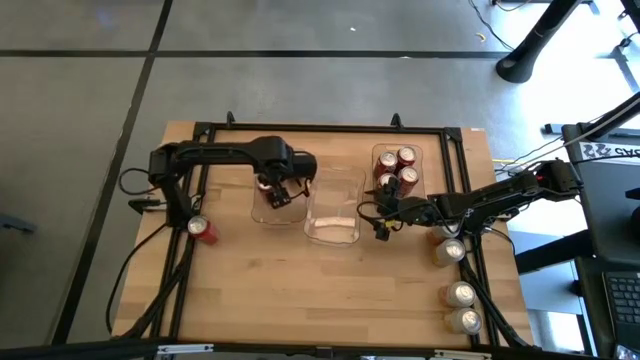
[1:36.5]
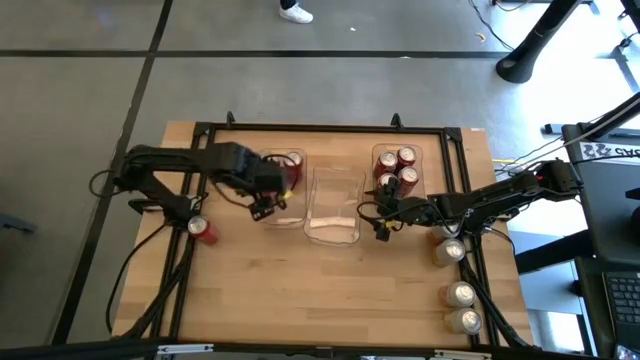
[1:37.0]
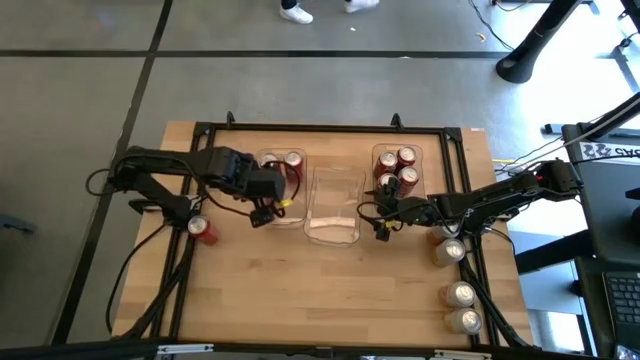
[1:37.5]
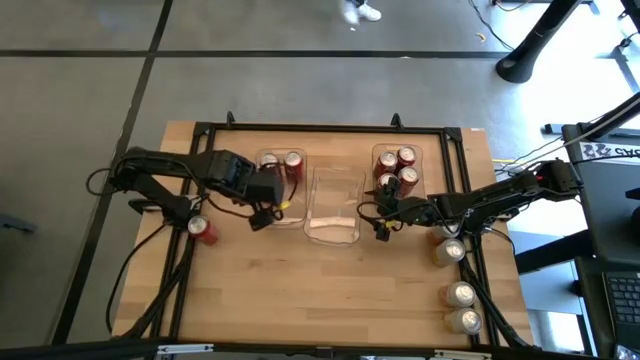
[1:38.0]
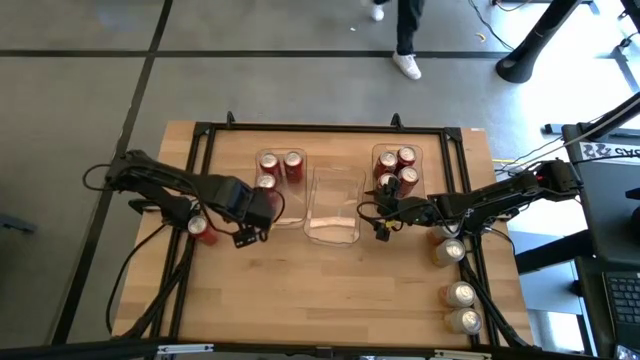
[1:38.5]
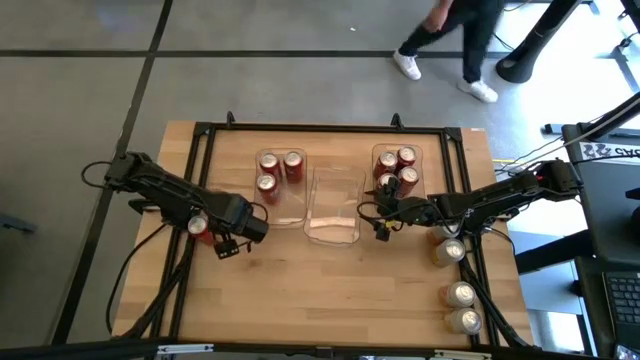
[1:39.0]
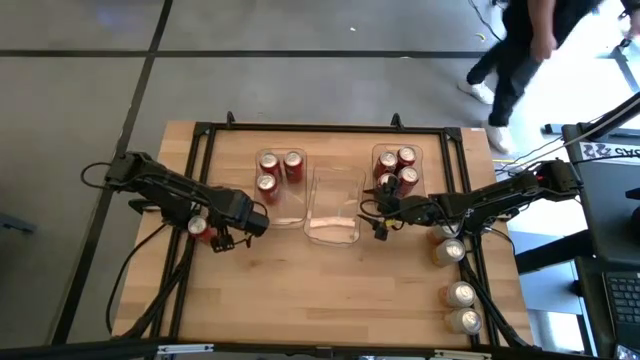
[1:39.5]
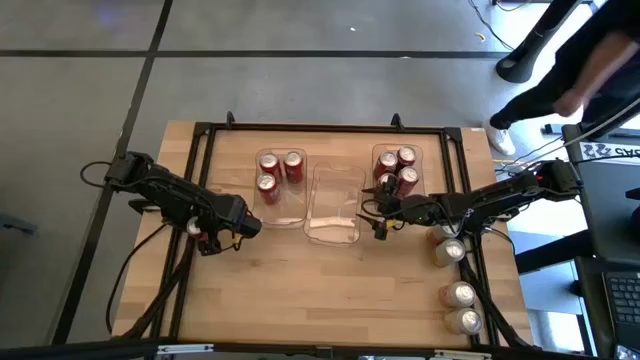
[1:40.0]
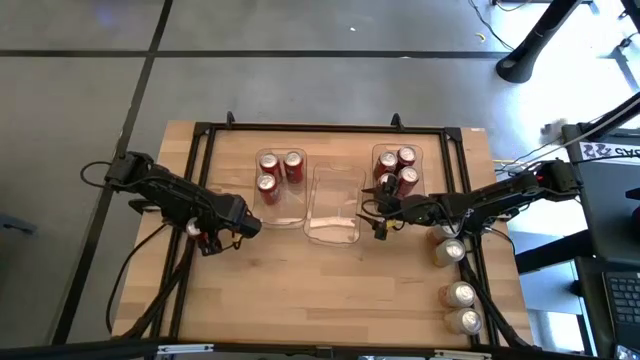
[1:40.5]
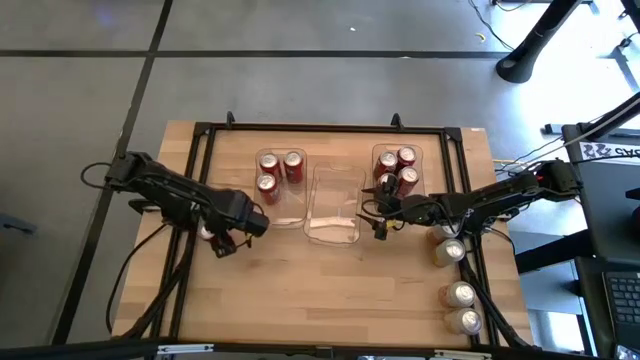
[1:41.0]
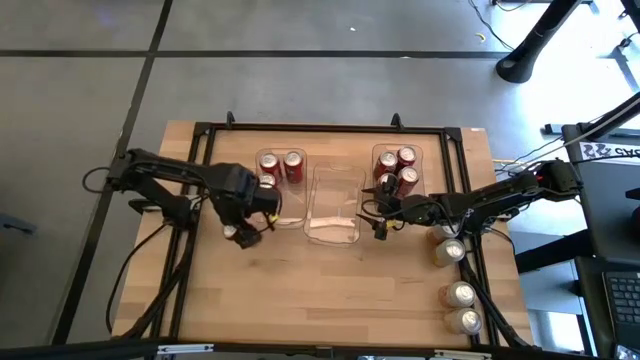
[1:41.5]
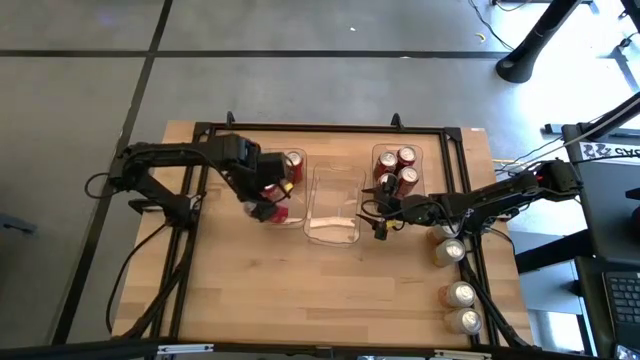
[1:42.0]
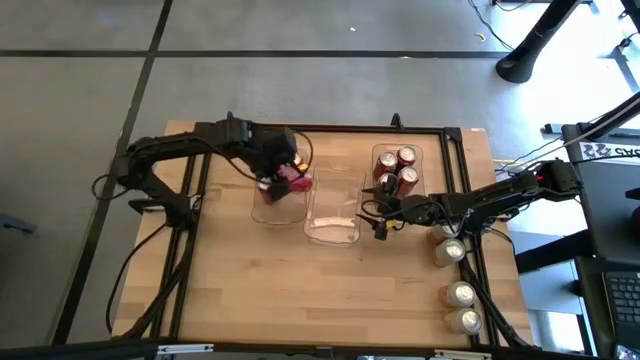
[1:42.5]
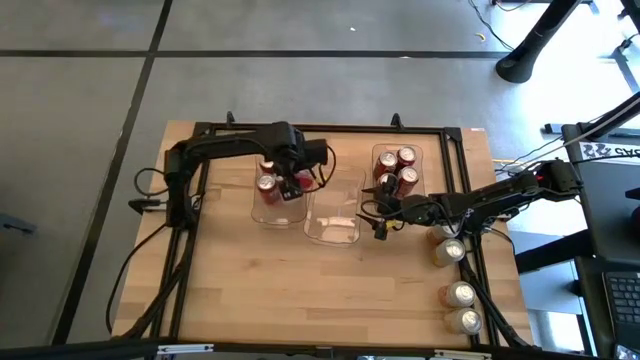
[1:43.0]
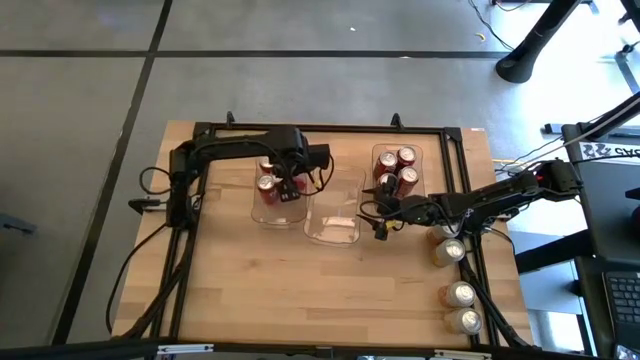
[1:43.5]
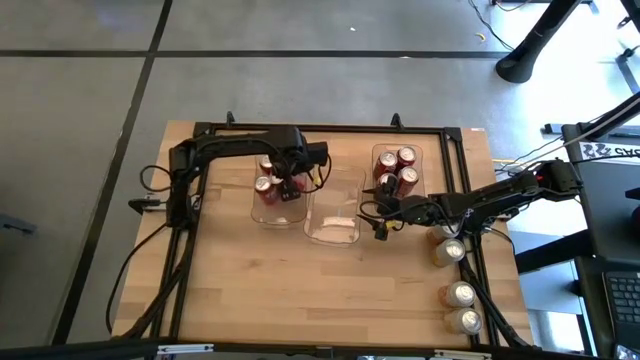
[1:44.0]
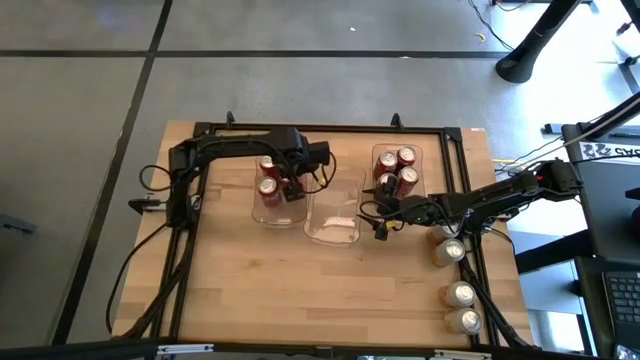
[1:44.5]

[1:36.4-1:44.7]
Task: Sort soda cans
Put the orange soda can into the left transparent bin

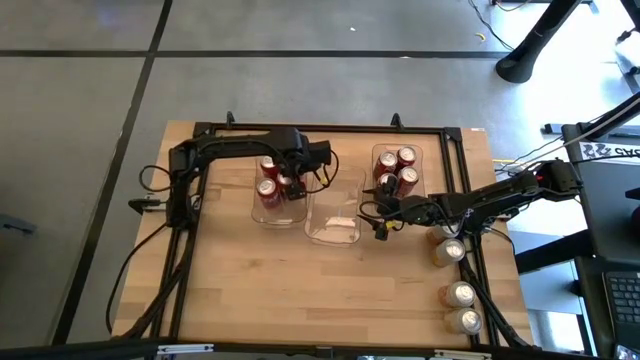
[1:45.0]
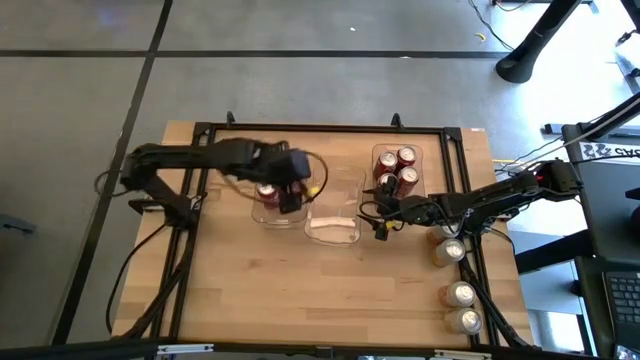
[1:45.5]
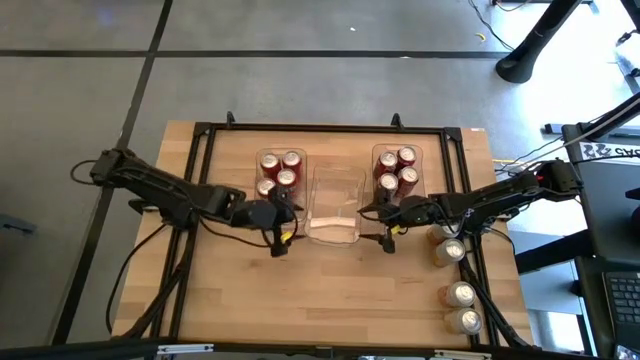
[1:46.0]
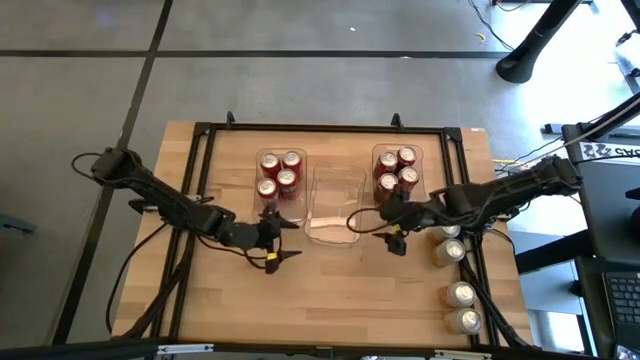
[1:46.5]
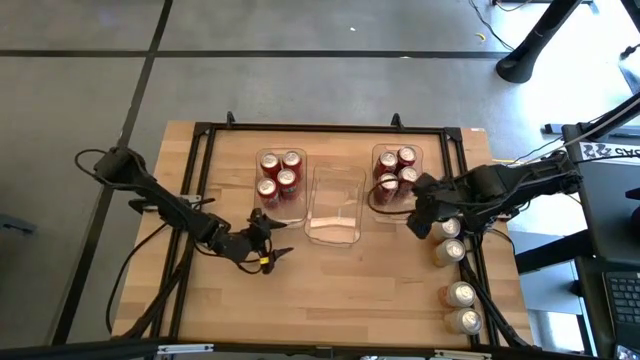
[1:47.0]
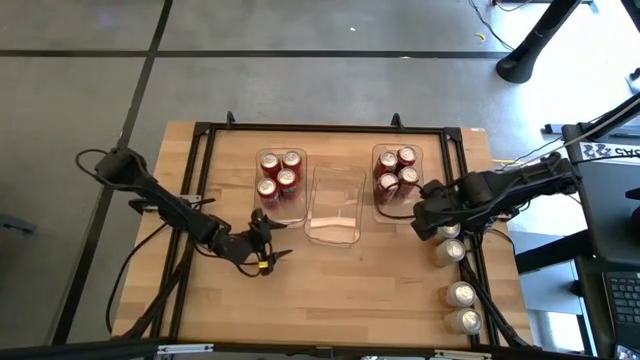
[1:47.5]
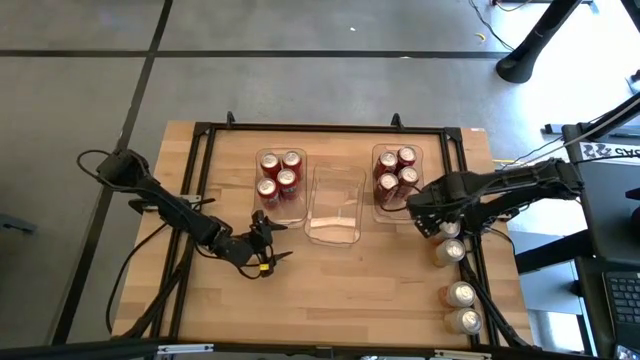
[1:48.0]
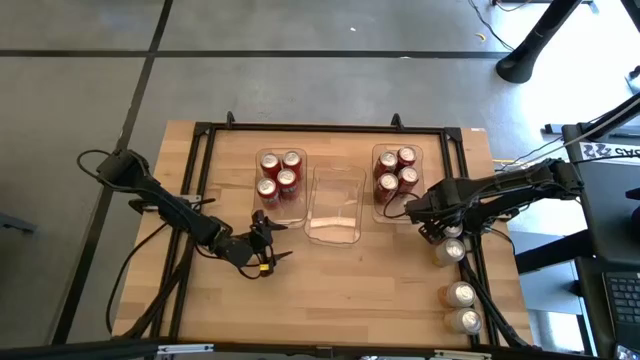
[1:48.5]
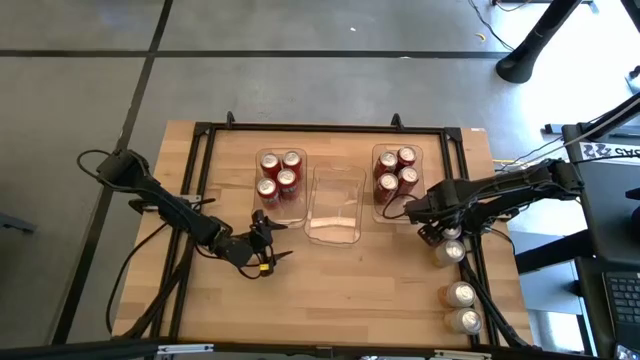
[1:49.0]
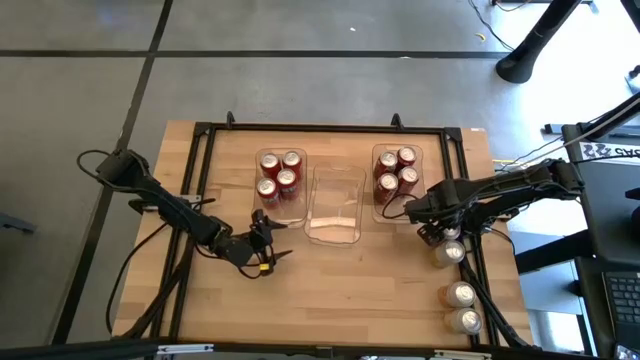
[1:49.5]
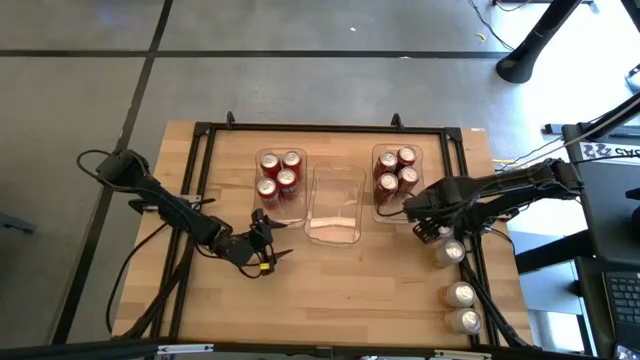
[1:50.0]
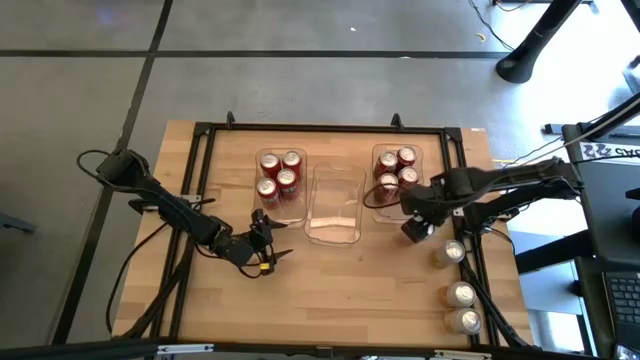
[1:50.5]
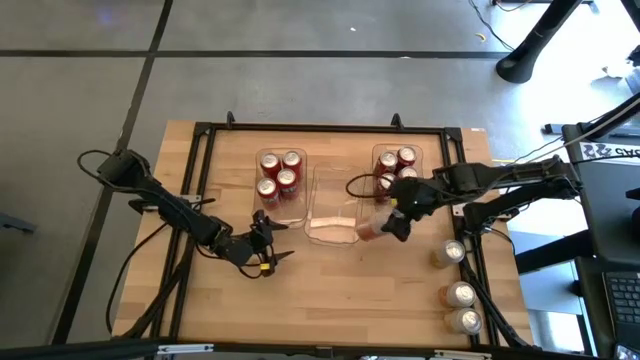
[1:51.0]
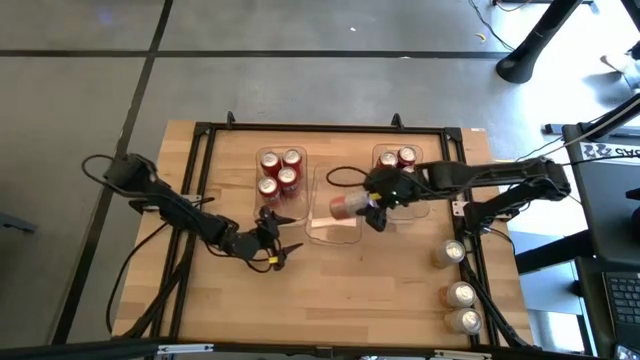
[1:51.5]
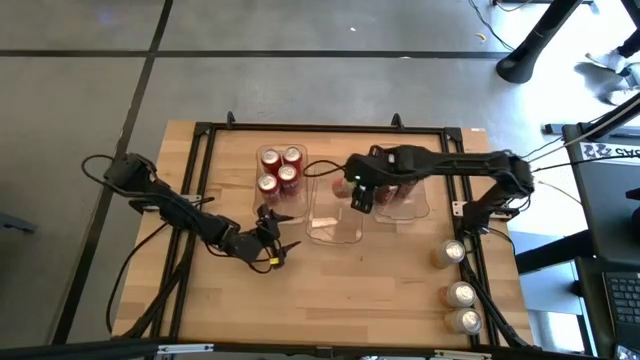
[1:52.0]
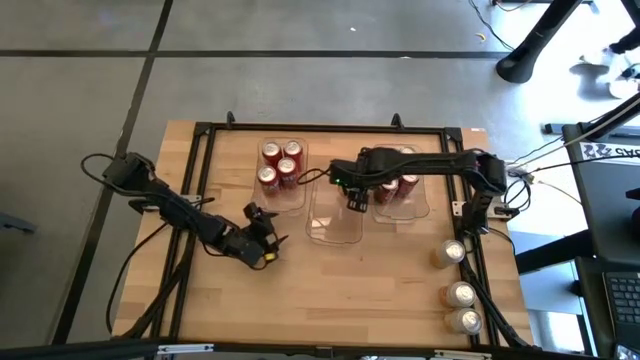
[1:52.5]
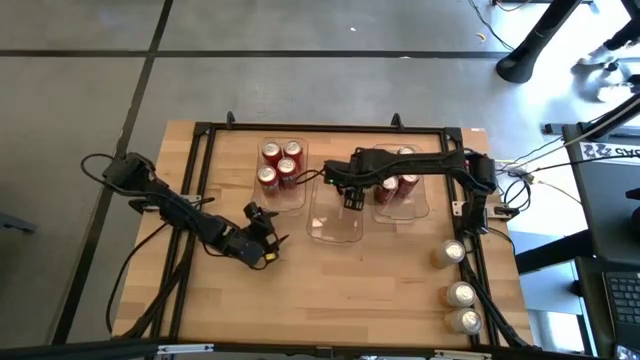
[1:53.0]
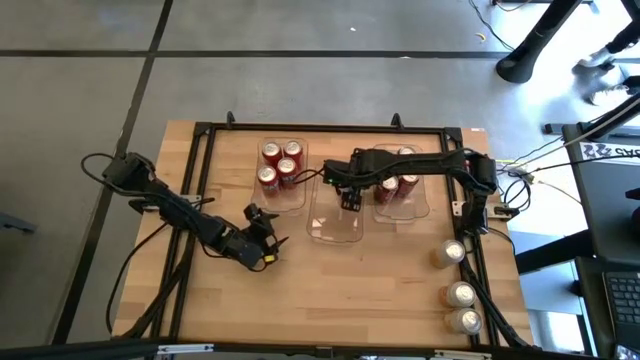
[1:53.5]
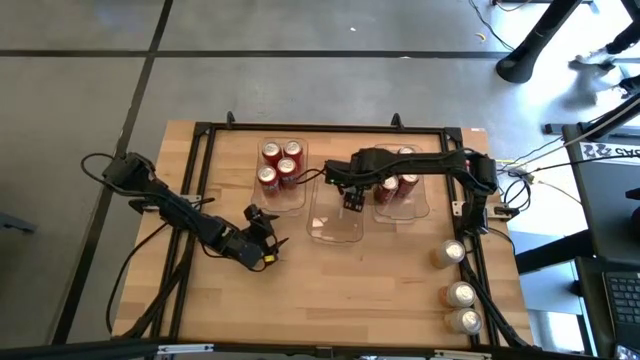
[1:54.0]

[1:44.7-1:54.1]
Put the orange white soda can into the center transparent bin

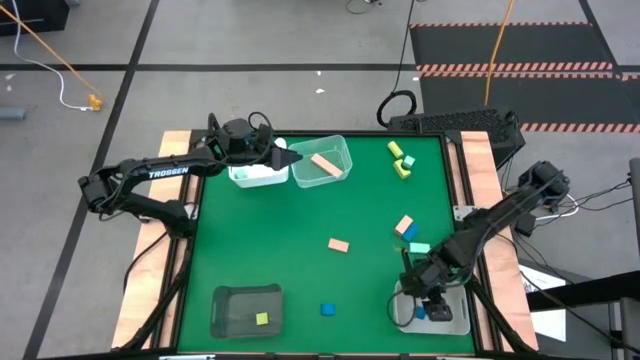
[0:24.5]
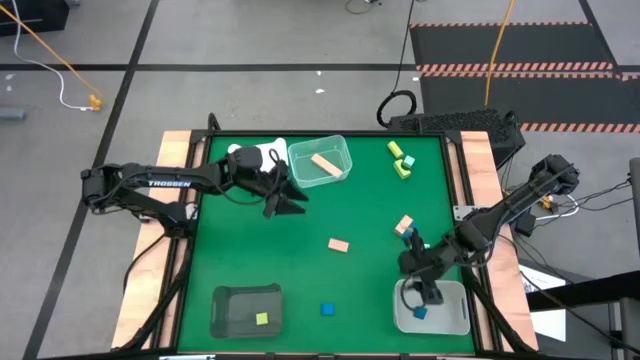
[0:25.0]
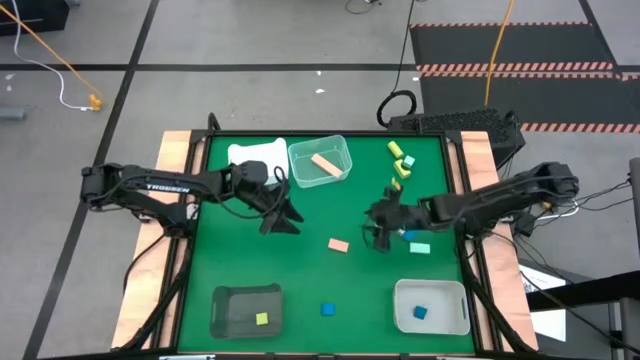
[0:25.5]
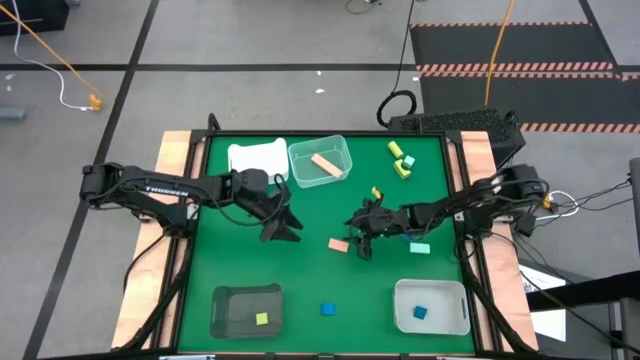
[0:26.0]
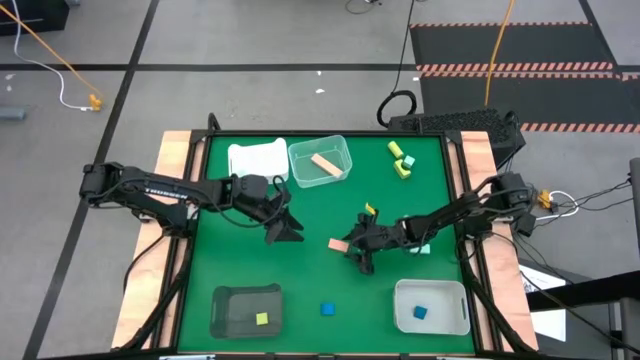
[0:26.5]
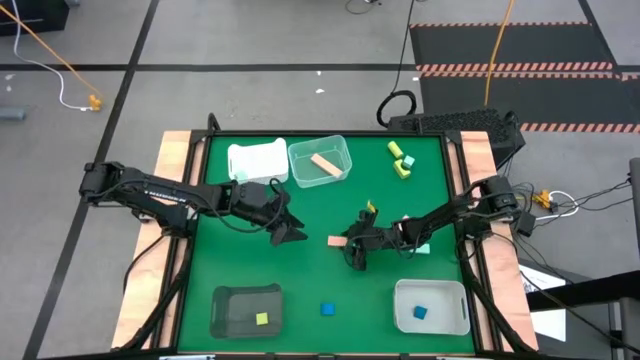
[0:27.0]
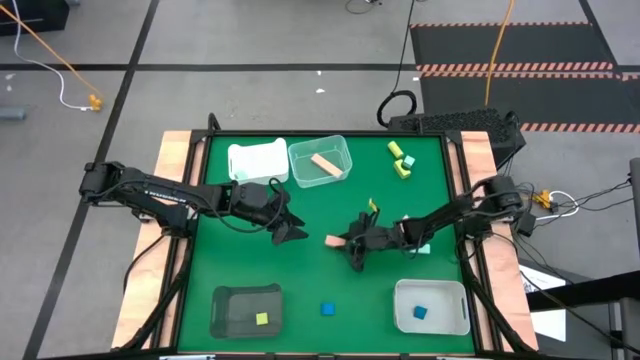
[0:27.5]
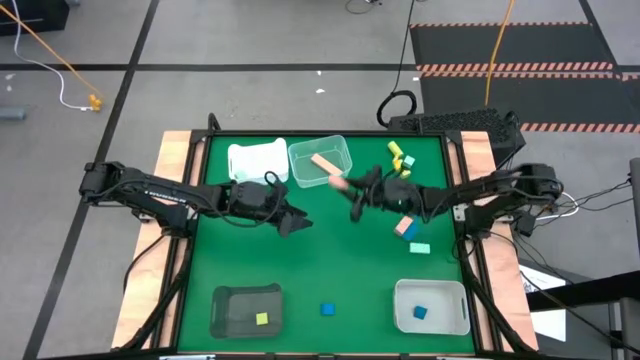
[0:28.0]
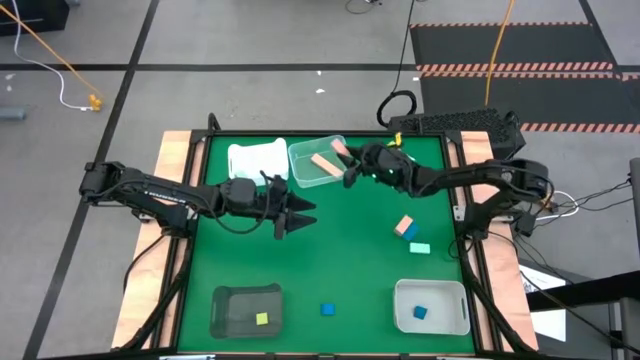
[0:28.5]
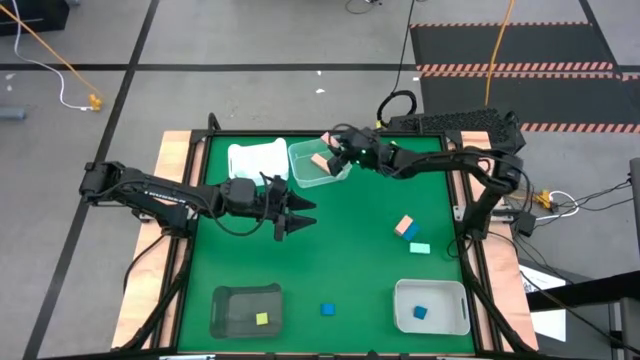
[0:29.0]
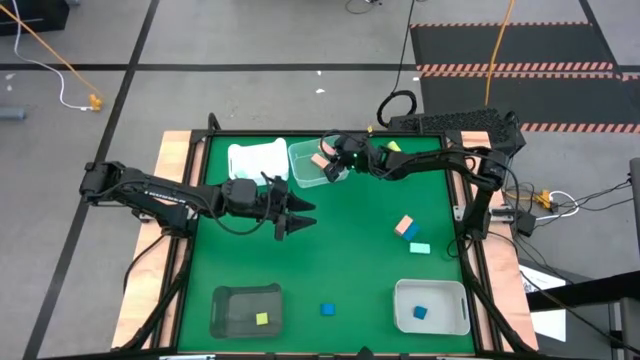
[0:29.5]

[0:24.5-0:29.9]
Task: Sort & place blocks by color
Put the bottom brown block into the transparent bin
